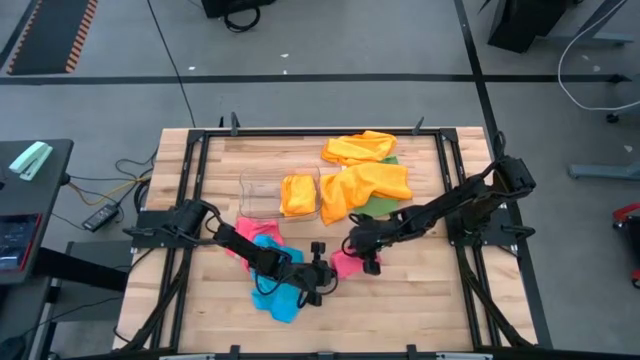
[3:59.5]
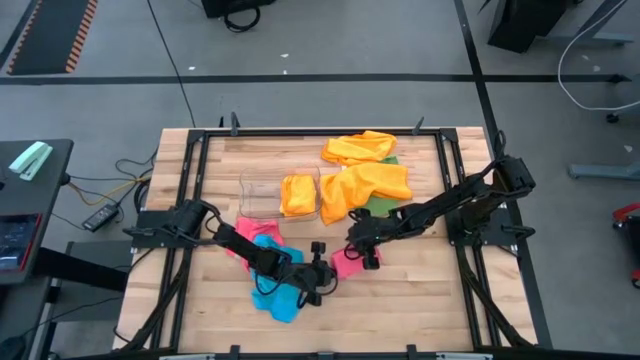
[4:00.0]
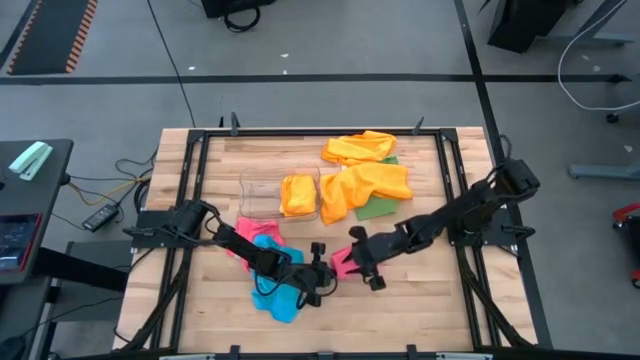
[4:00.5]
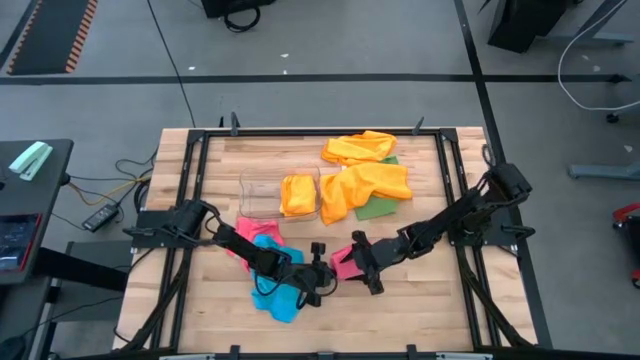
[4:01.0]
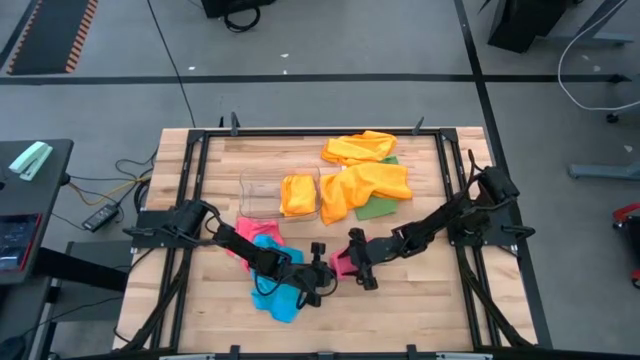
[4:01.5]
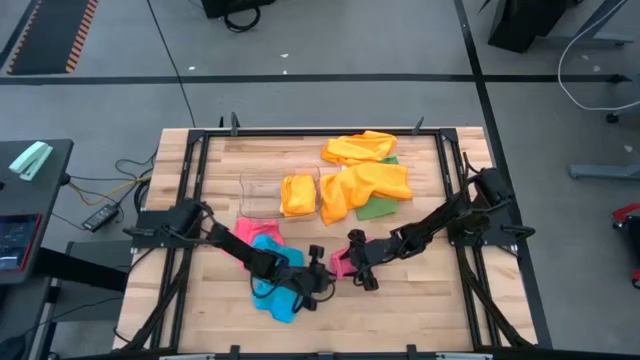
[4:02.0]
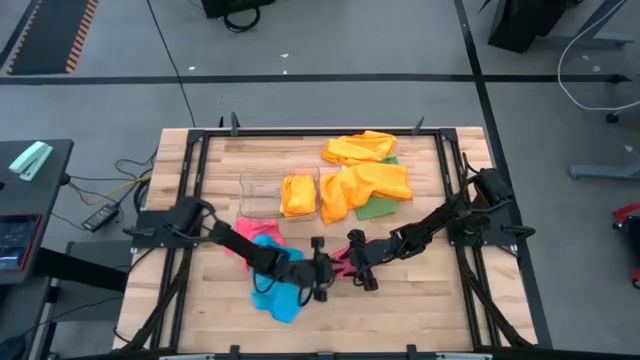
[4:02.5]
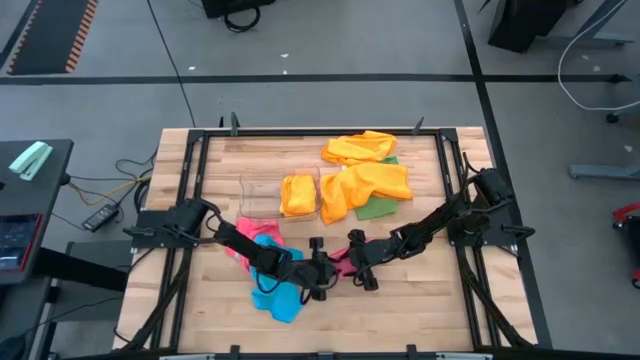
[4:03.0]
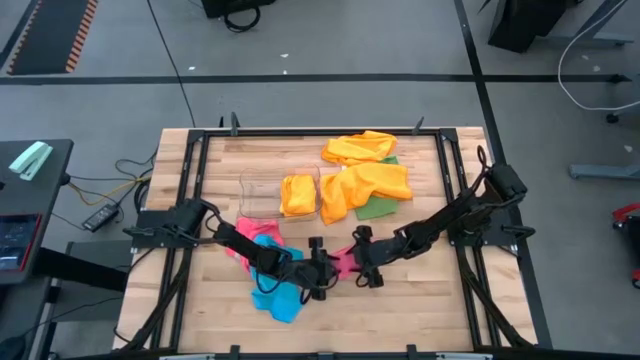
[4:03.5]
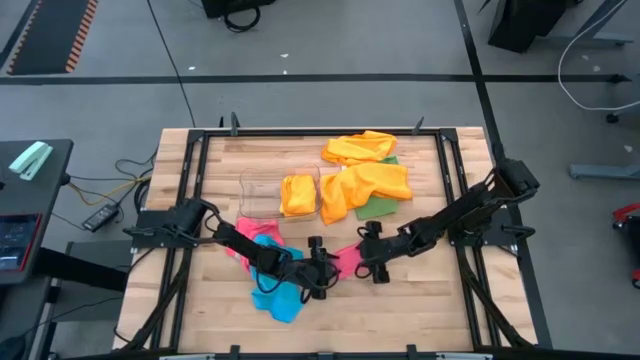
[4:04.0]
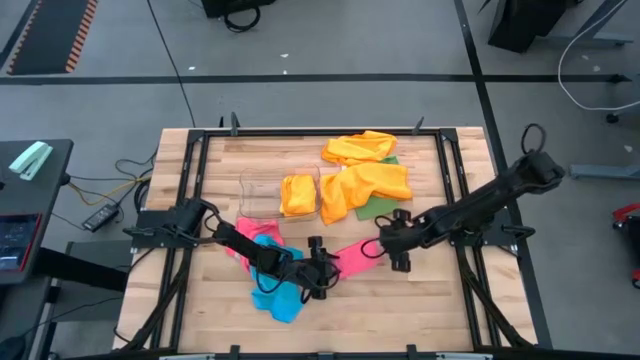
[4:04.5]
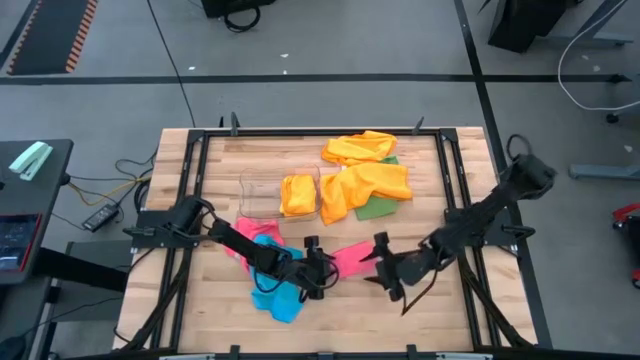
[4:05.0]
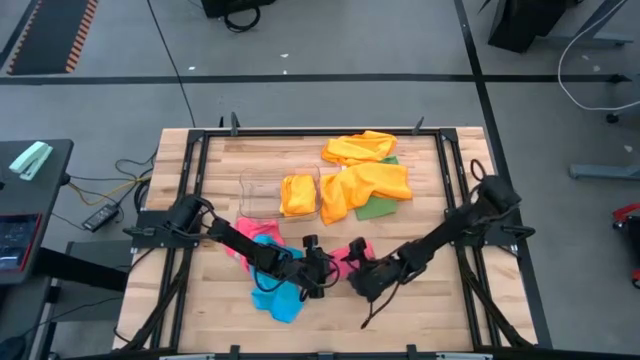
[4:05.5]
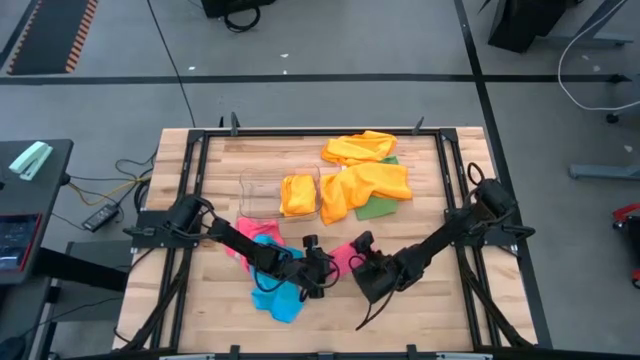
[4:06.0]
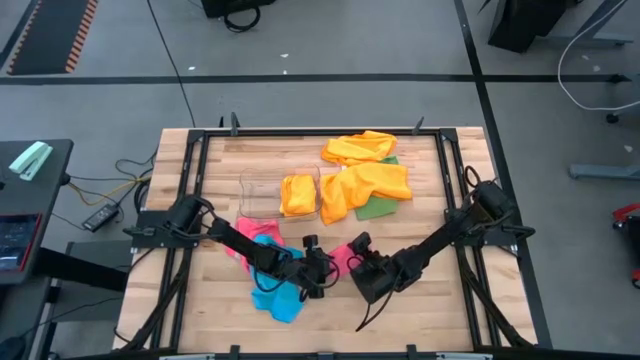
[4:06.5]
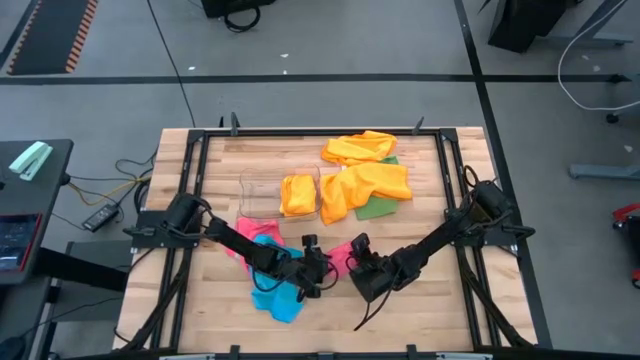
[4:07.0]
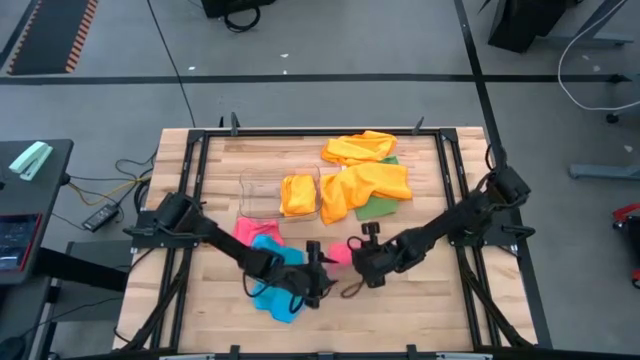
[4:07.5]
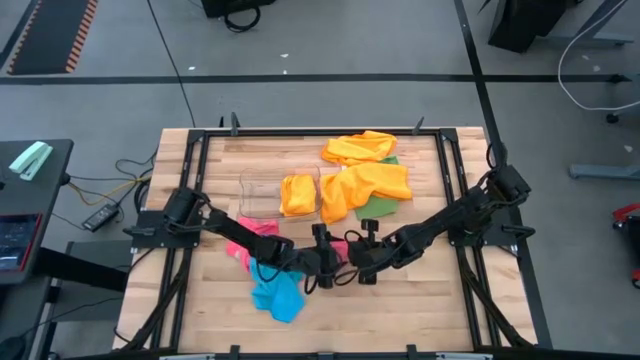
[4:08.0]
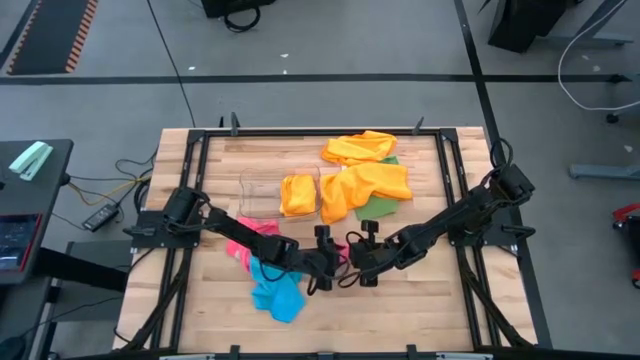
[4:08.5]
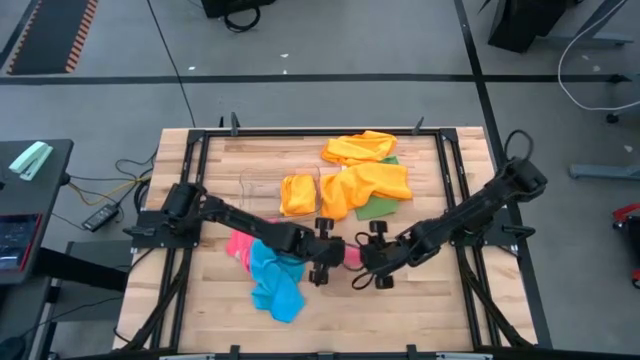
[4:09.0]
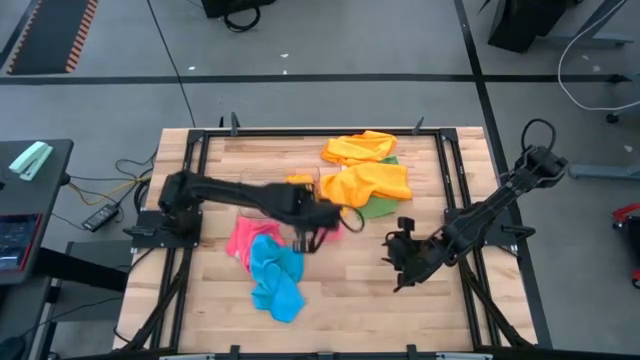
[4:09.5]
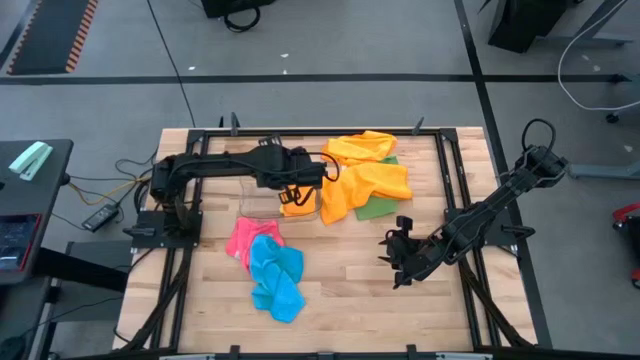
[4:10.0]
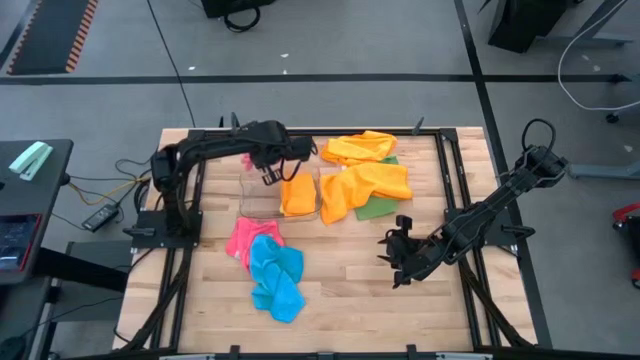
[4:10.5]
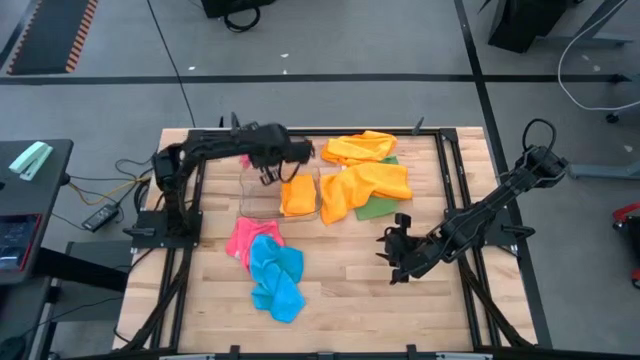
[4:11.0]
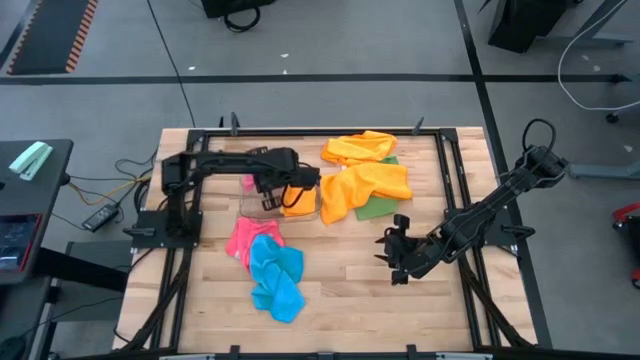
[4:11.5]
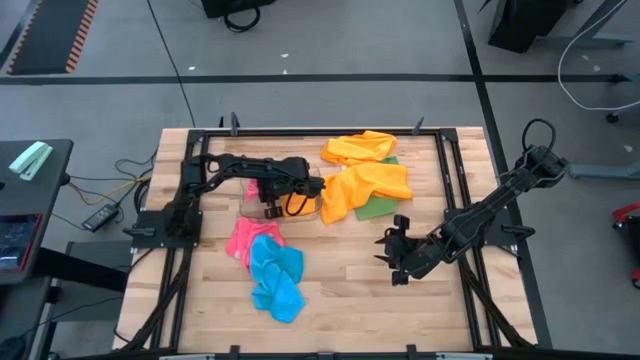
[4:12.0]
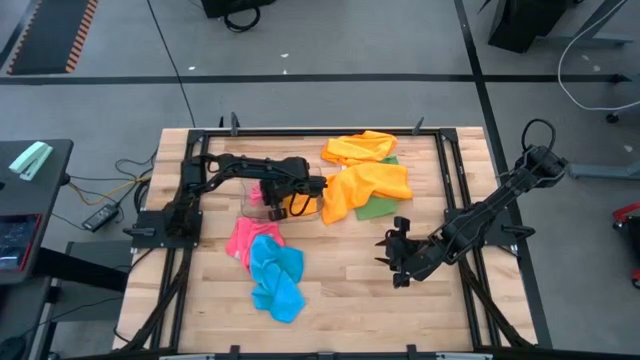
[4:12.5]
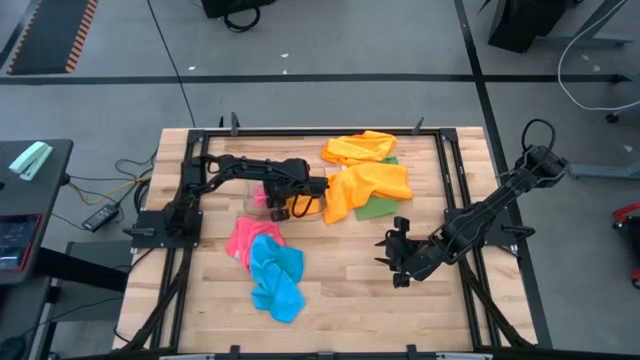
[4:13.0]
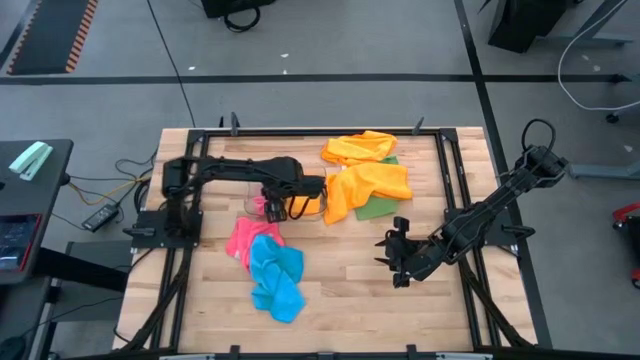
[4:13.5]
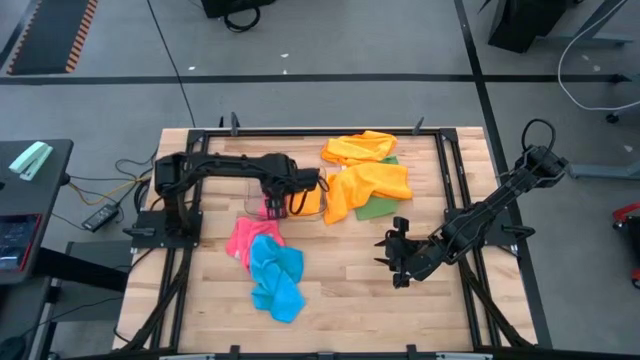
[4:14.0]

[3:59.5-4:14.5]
Task: Fold microfiber towels
Put the right folded pink microfiber cloth into the transparent bin
